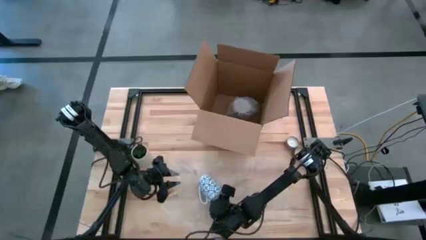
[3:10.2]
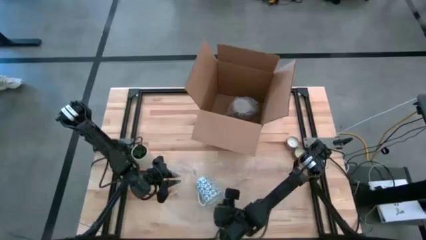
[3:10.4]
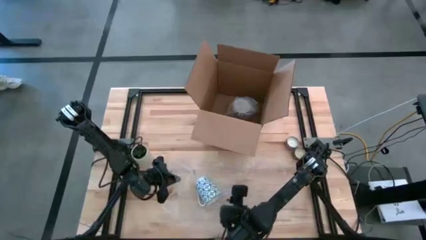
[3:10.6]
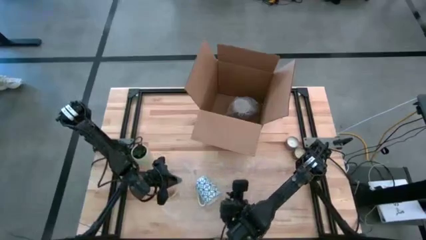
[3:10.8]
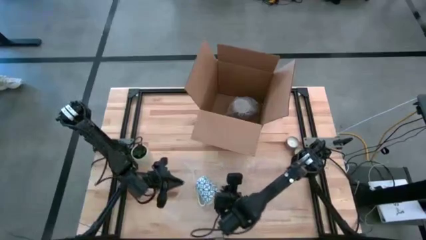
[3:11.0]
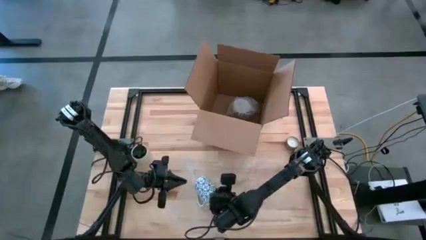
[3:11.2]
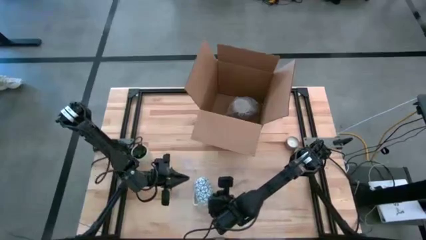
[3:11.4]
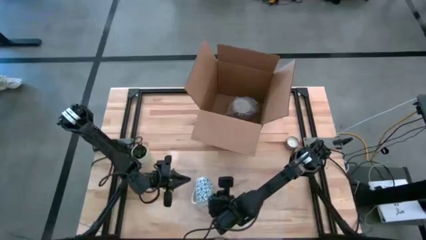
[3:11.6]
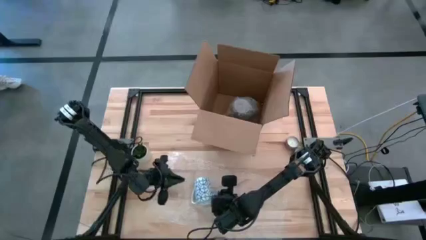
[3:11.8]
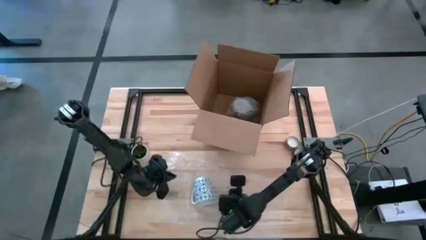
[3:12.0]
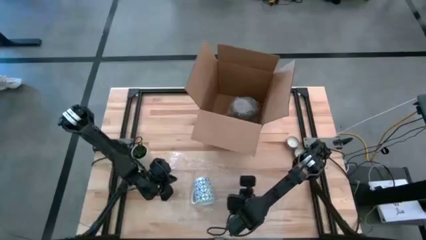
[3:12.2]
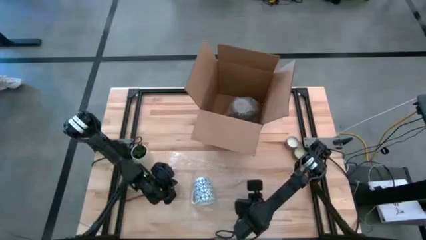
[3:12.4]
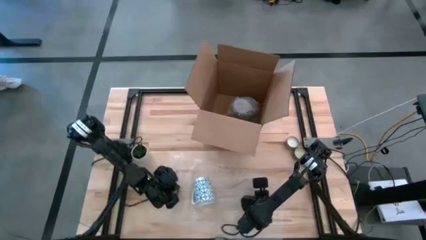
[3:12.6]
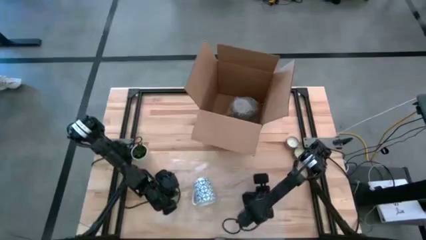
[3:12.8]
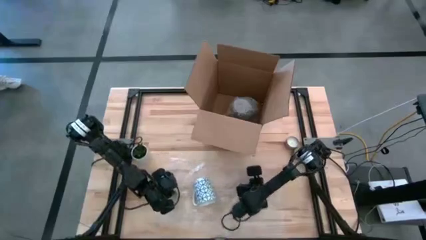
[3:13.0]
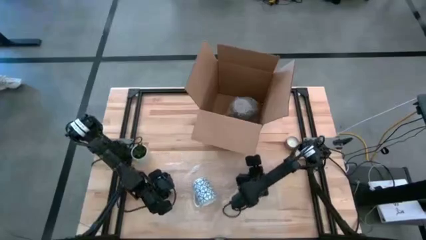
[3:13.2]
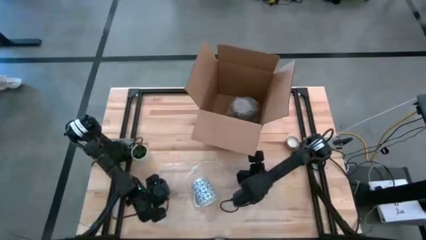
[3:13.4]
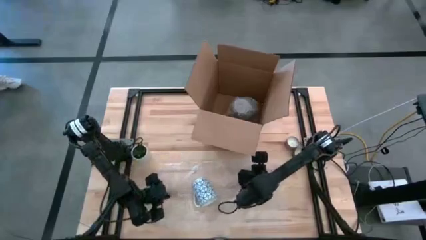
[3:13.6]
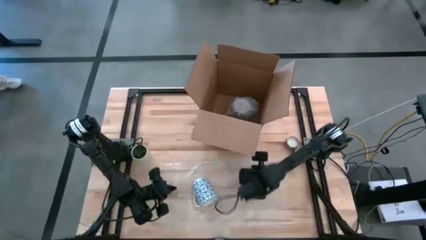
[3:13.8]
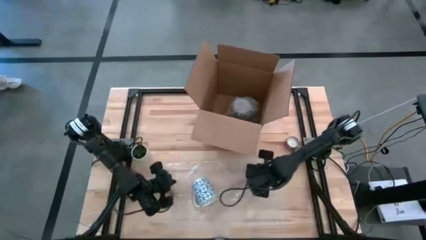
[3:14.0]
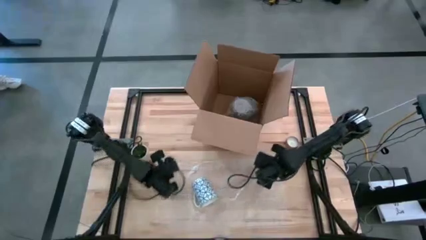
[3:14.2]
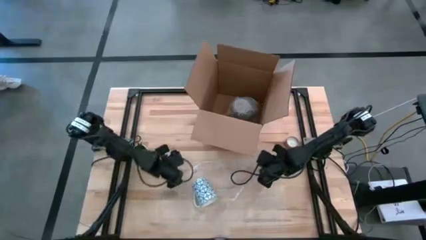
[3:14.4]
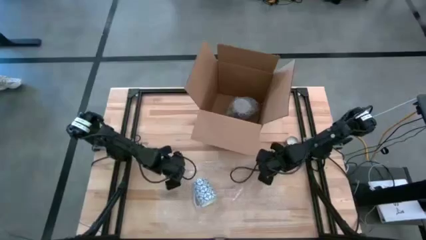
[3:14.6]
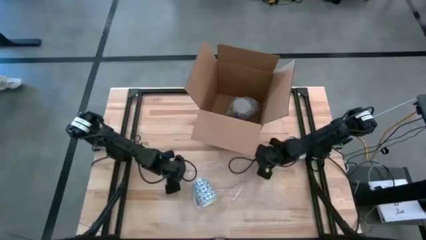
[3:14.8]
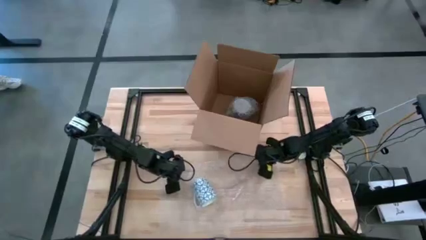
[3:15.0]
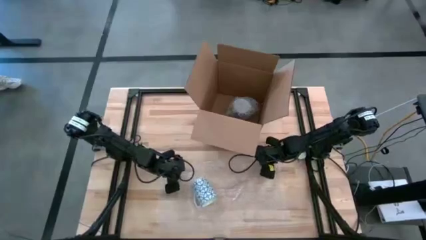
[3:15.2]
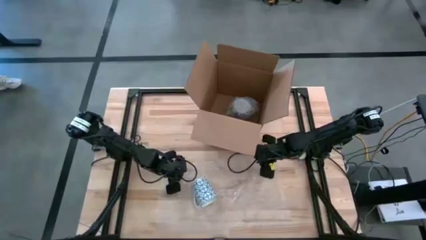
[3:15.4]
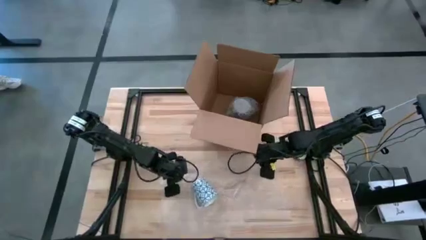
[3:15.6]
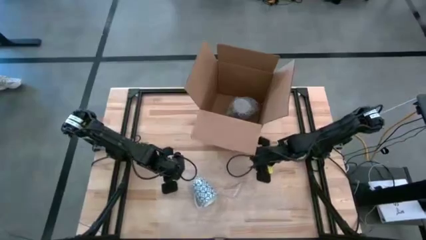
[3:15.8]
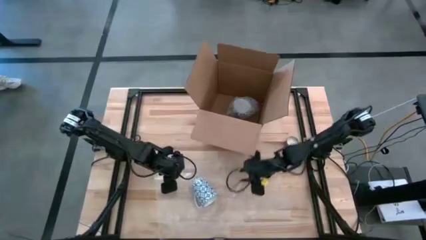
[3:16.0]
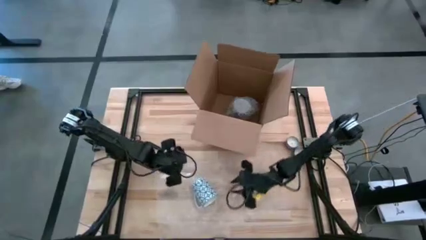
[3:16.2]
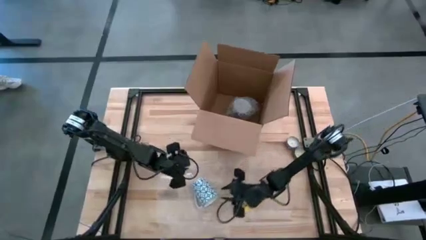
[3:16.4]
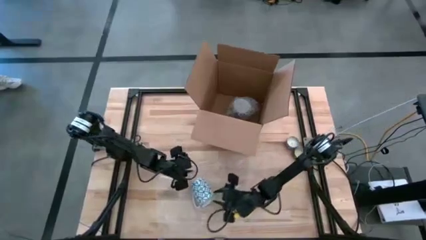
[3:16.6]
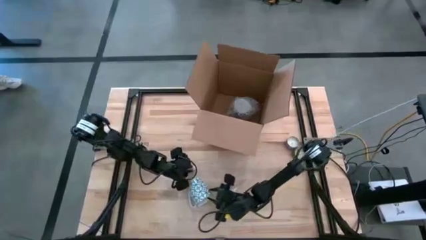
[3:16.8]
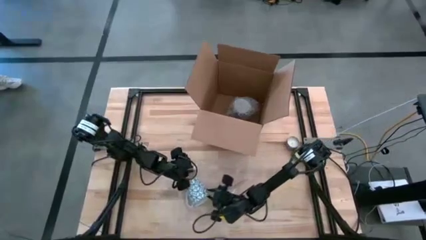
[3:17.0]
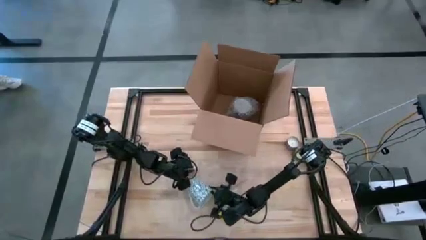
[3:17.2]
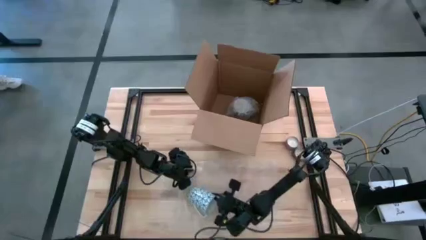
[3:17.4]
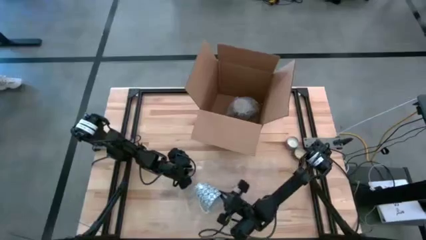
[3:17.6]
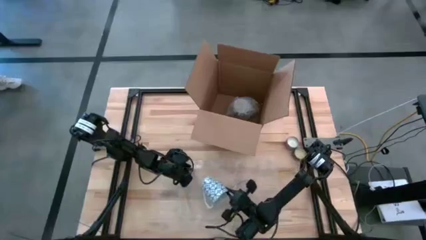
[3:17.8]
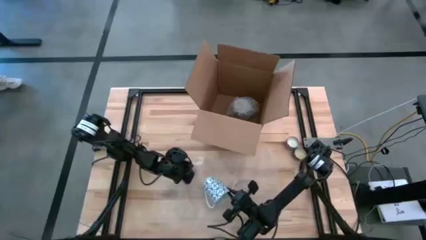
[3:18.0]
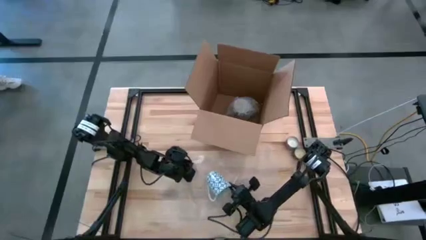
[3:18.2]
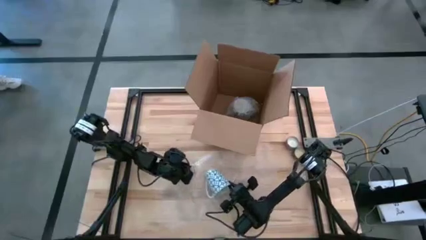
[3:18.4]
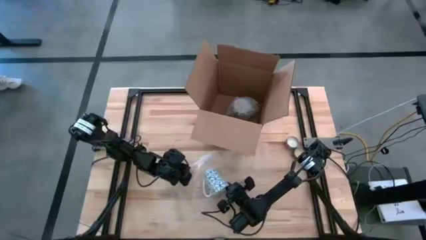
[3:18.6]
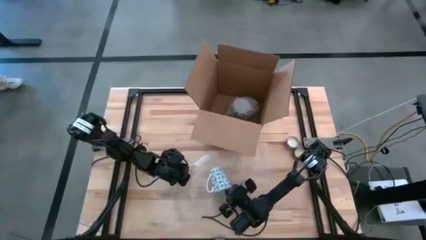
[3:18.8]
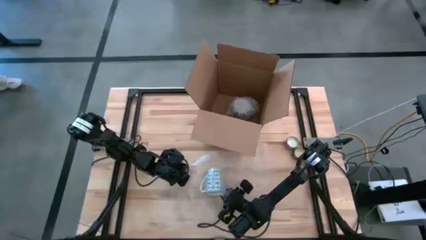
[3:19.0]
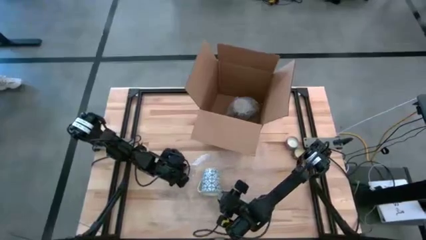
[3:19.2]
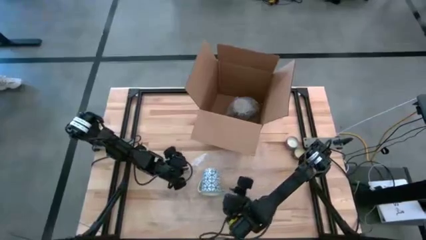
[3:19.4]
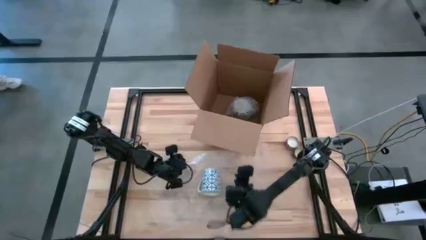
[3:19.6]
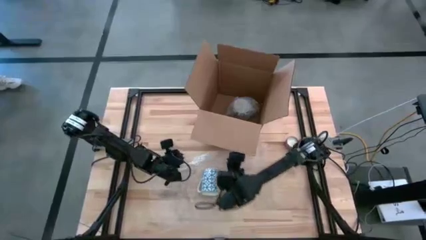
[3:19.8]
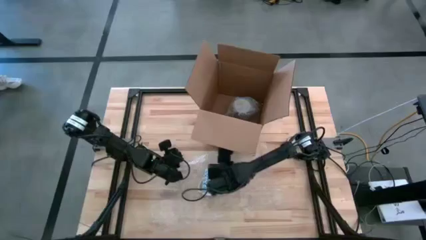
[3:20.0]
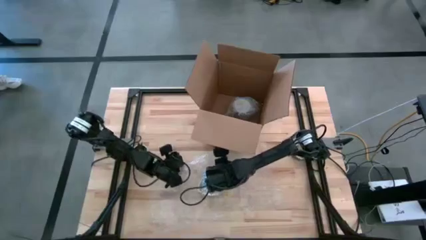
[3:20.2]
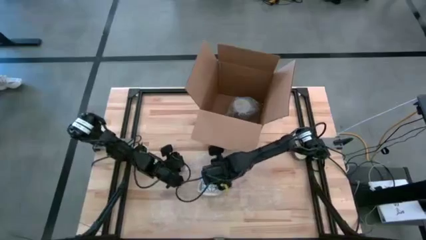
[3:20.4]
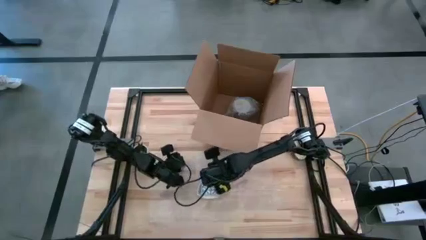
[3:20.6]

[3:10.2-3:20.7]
Task: wrap mug
Wrap the blue patterned mug with the bubble wrap

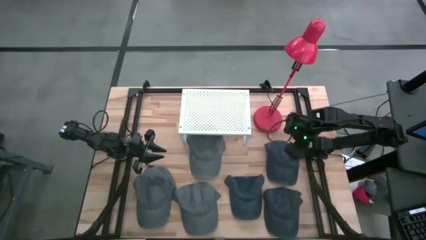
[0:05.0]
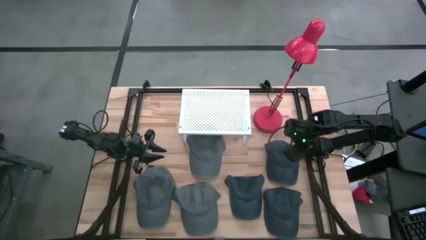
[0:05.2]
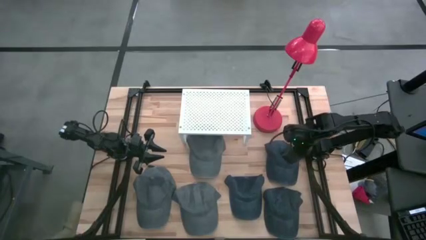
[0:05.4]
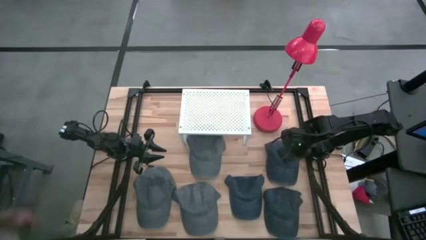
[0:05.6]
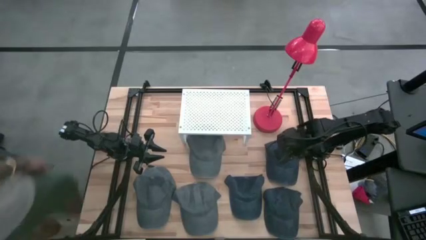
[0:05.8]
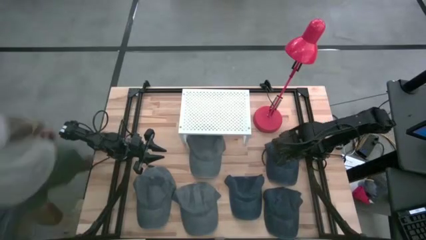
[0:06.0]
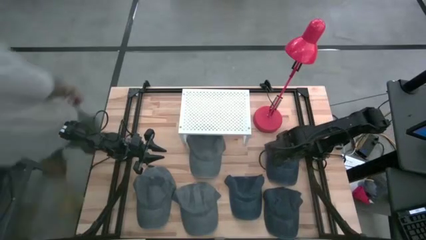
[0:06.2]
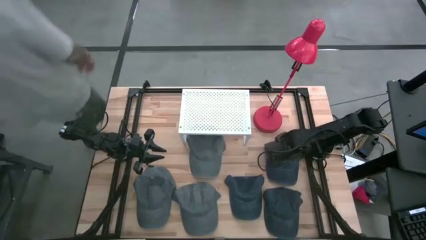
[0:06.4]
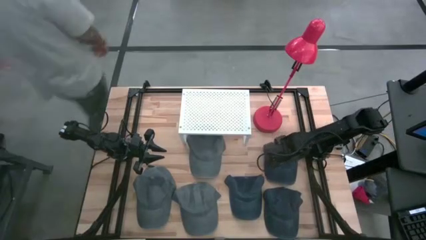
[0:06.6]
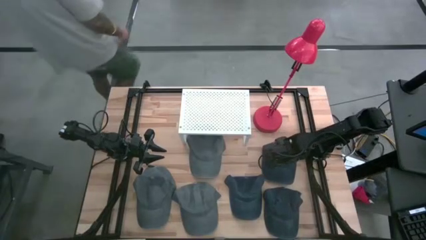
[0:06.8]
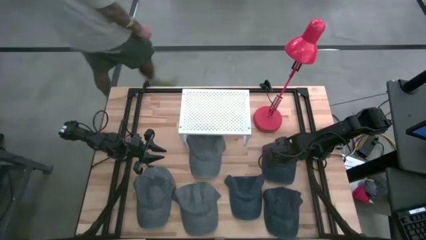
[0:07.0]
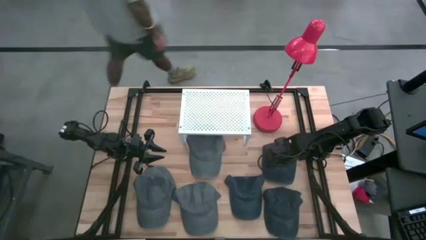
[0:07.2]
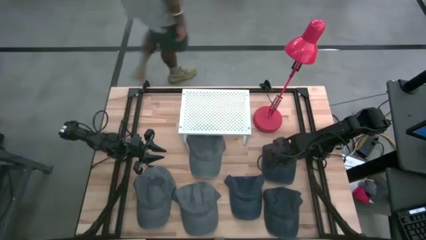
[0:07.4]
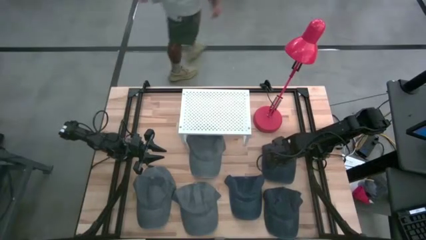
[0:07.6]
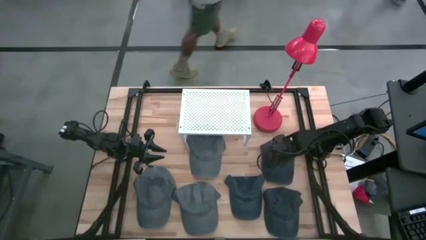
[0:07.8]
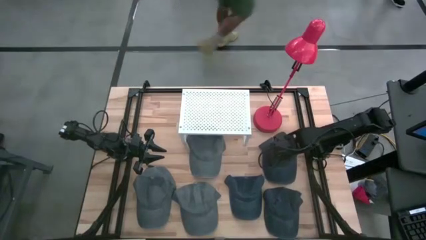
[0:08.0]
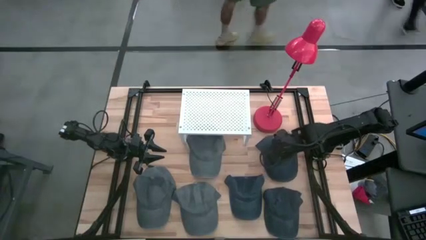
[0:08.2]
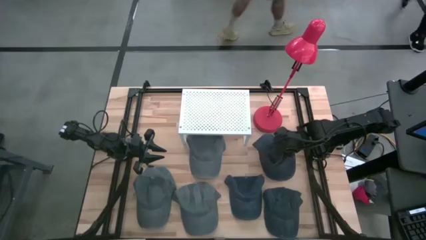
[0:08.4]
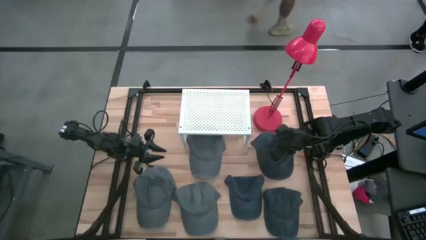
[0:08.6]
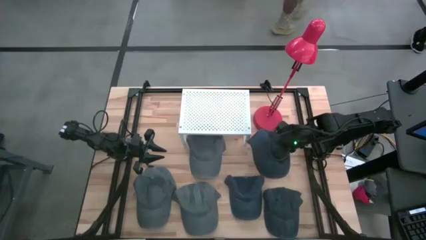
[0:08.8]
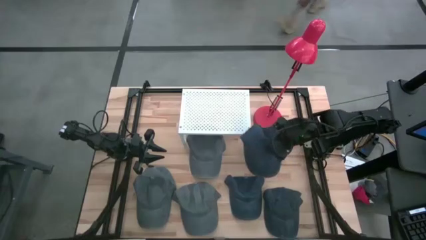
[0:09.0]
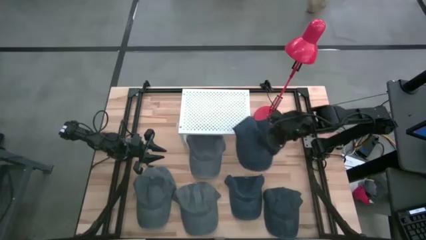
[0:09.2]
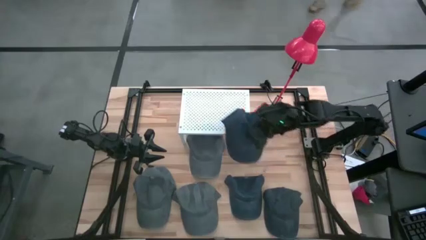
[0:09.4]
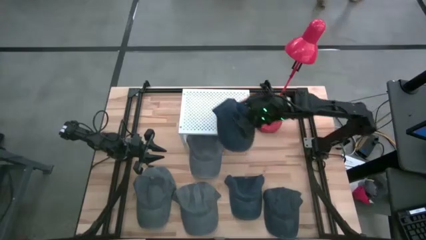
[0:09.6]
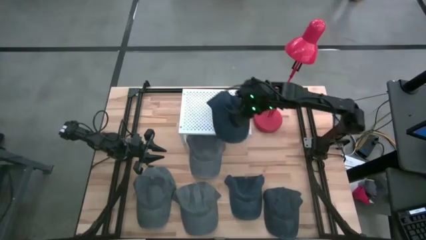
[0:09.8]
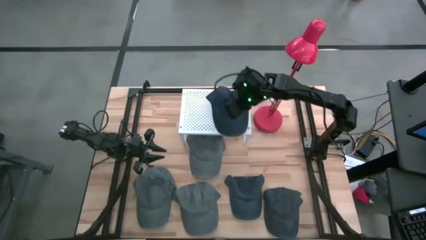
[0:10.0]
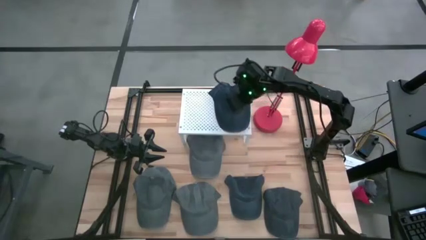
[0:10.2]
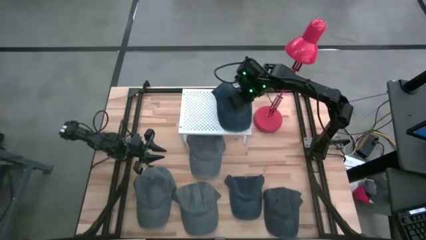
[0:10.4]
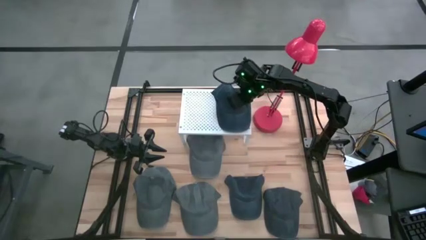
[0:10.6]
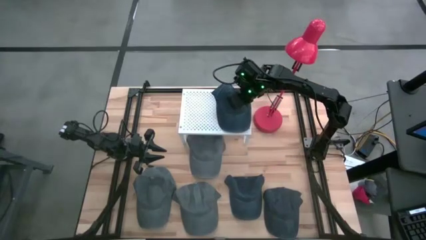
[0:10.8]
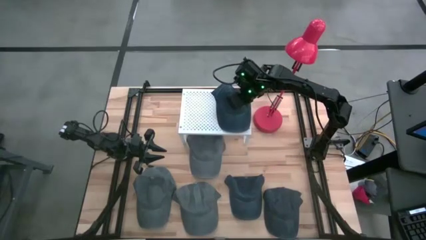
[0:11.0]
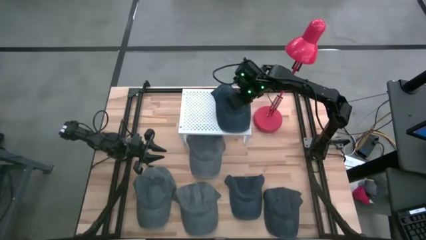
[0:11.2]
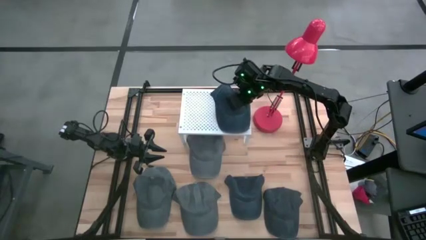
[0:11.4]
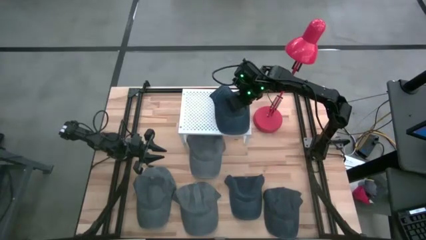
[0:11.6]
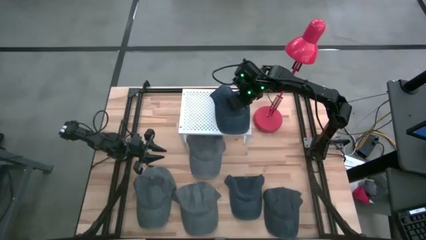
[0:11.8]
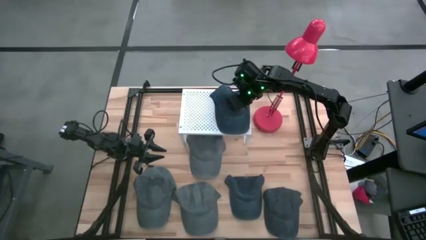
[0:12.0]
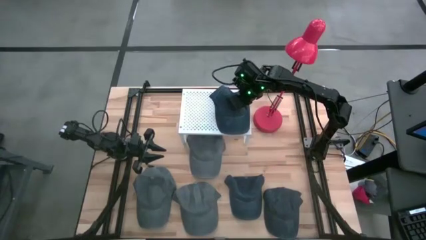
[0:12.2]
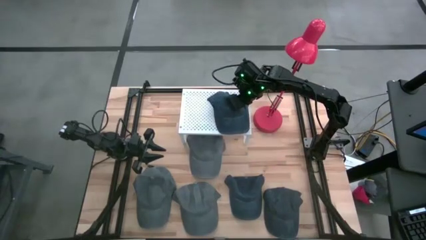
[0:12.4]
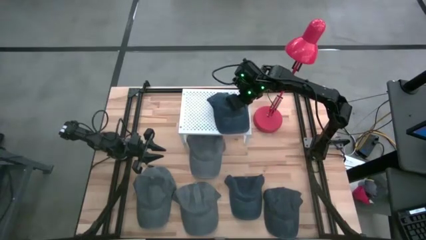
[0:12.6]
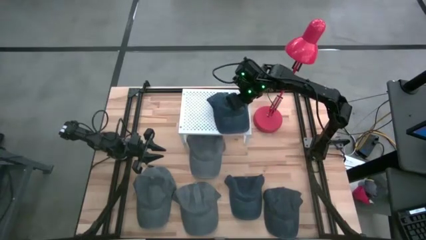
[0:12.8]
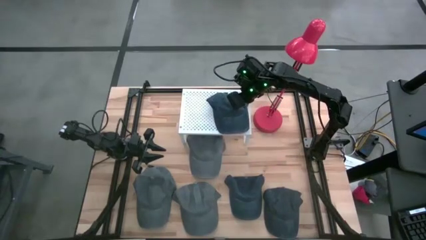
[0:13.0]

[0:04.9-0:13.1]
Task: Pick & Place hat
Put the top right black cap on the shelf
